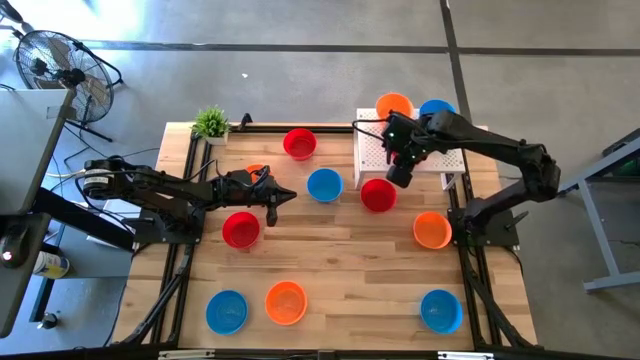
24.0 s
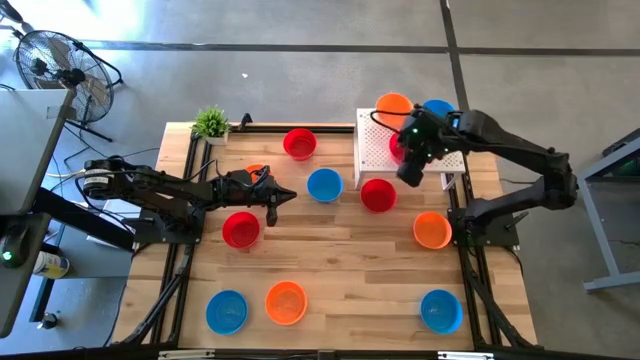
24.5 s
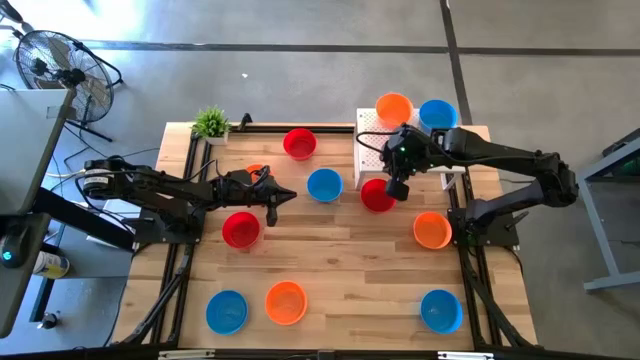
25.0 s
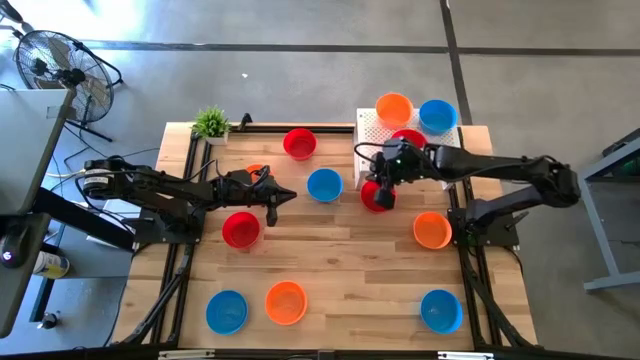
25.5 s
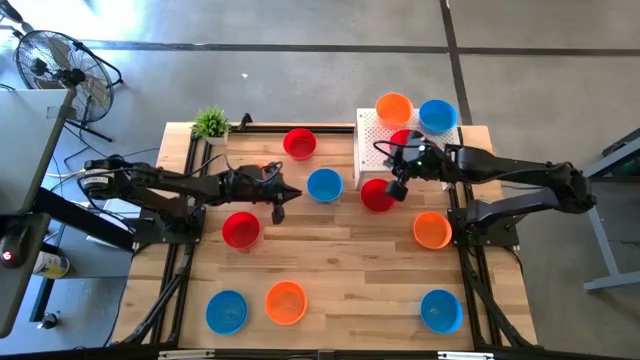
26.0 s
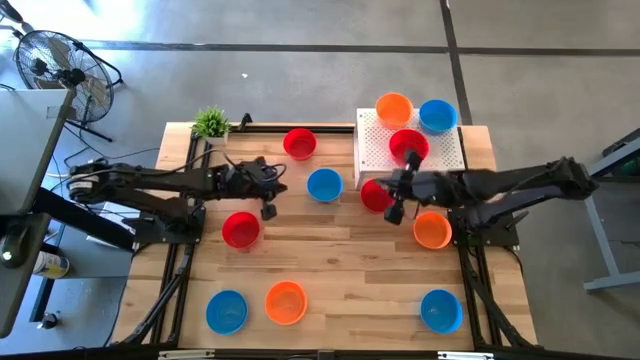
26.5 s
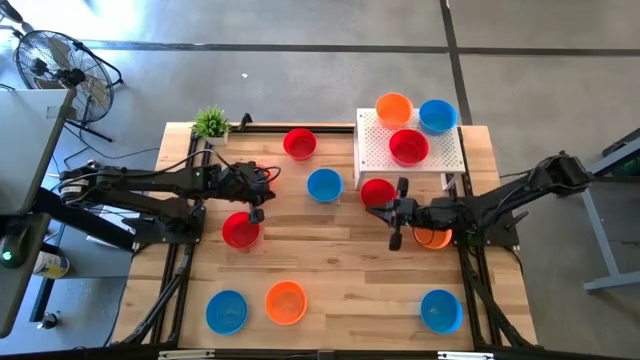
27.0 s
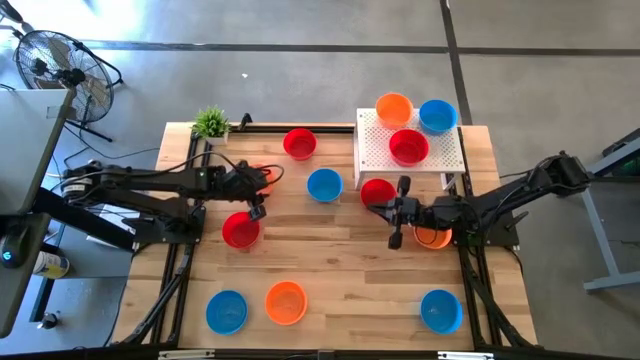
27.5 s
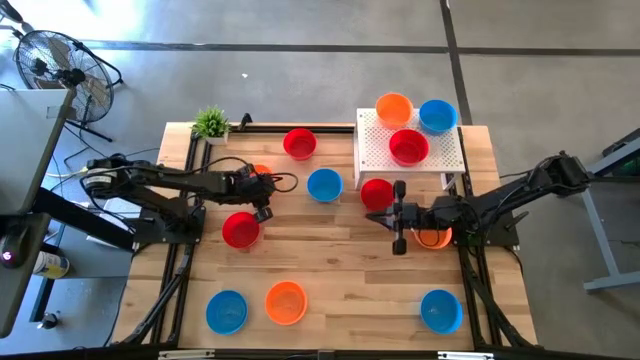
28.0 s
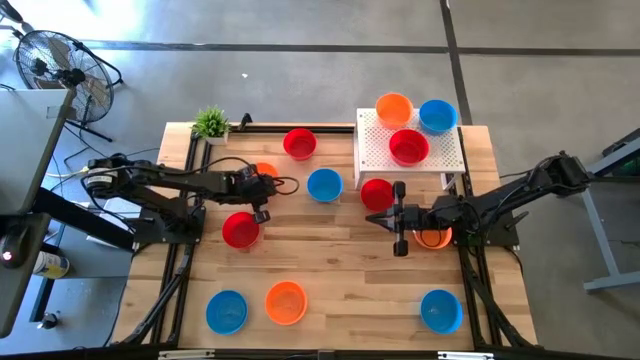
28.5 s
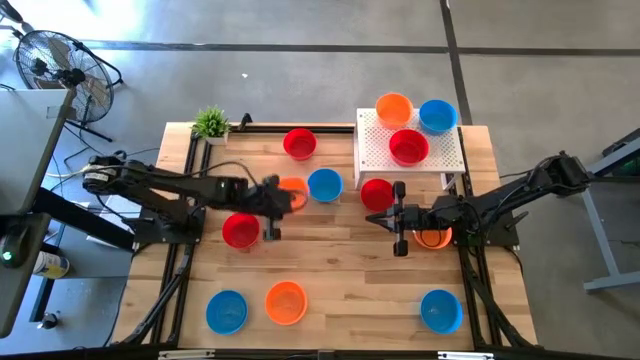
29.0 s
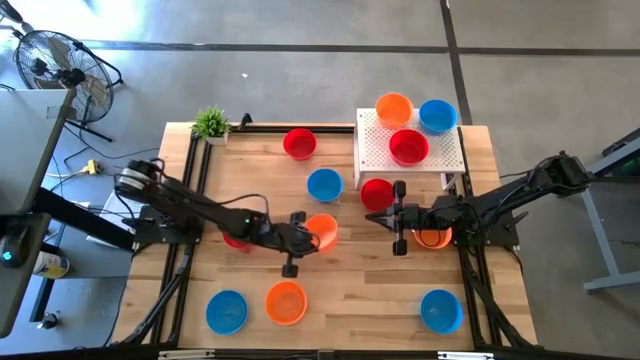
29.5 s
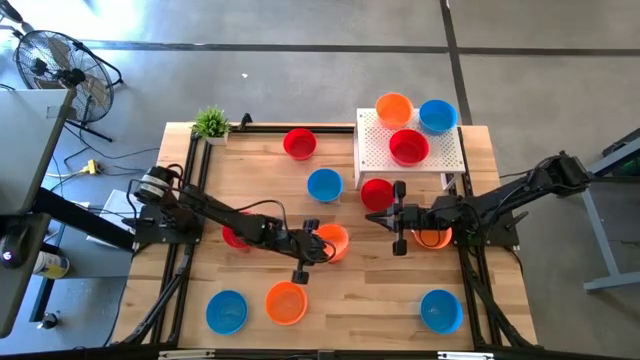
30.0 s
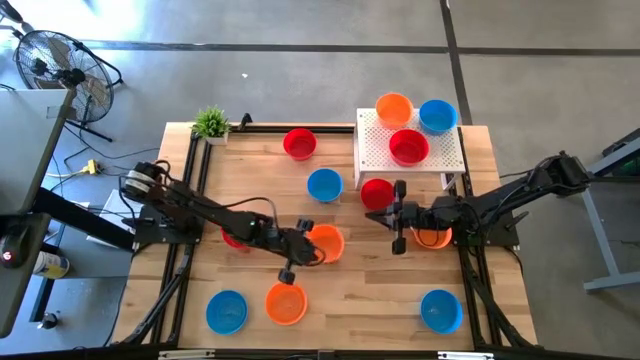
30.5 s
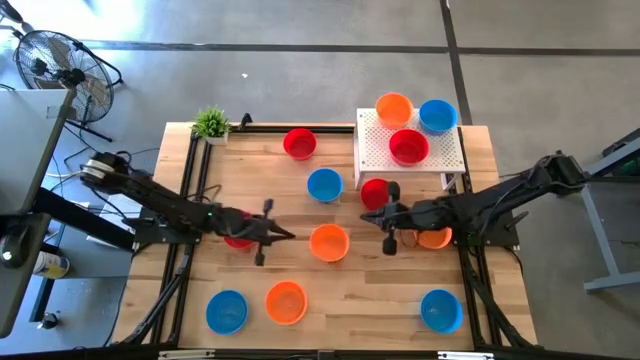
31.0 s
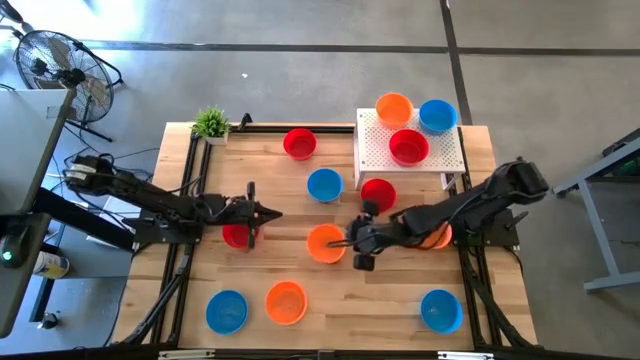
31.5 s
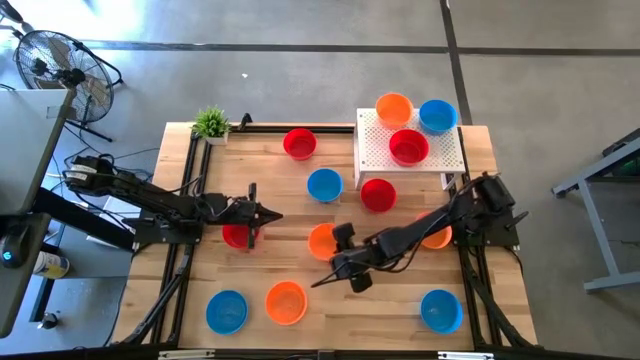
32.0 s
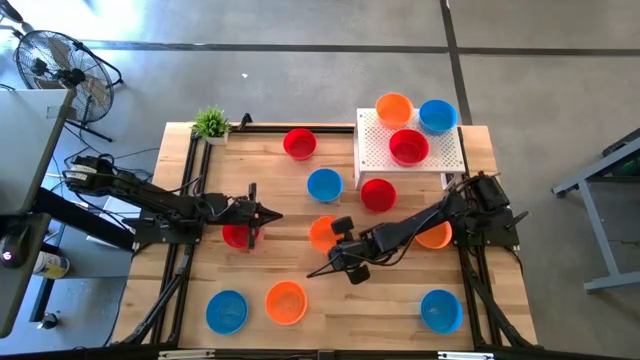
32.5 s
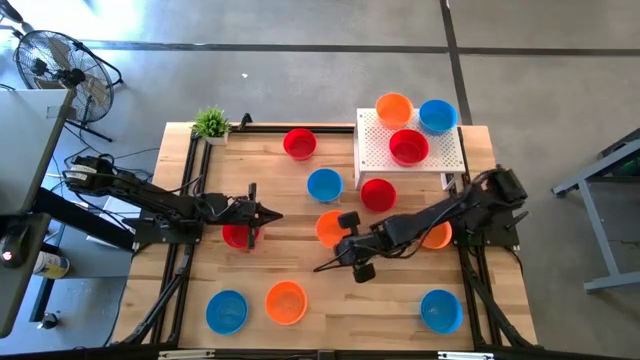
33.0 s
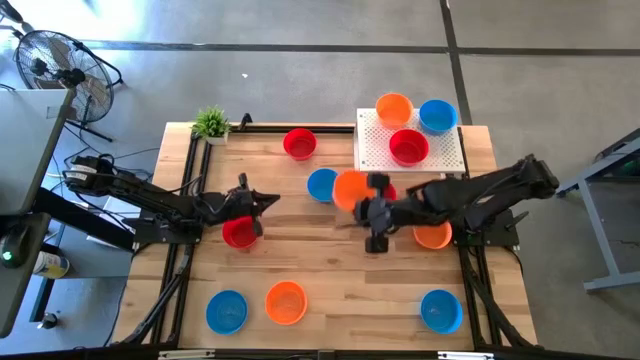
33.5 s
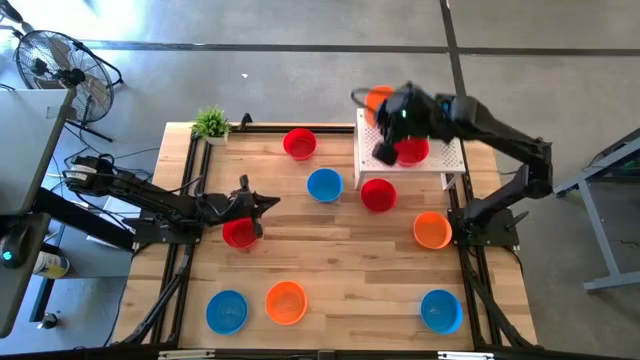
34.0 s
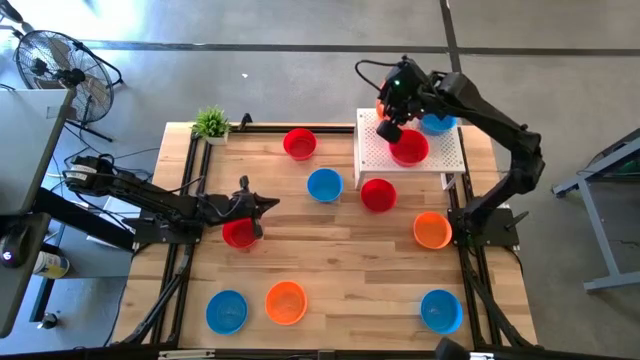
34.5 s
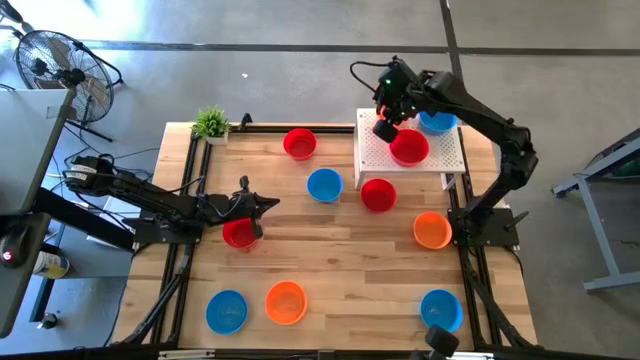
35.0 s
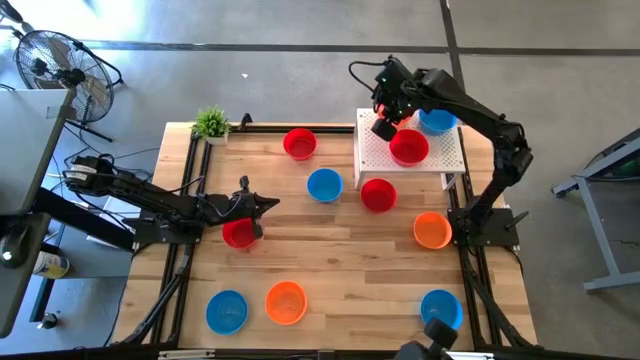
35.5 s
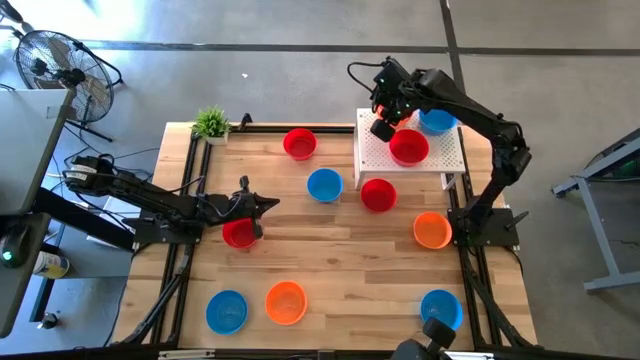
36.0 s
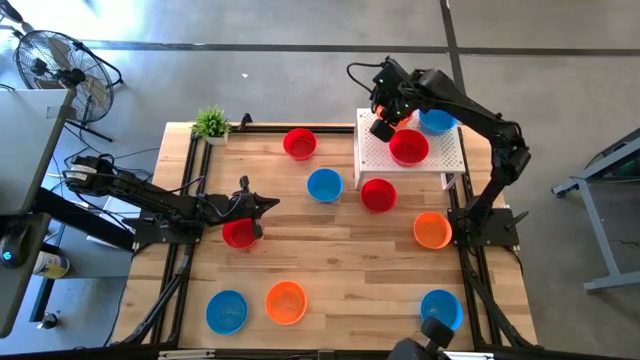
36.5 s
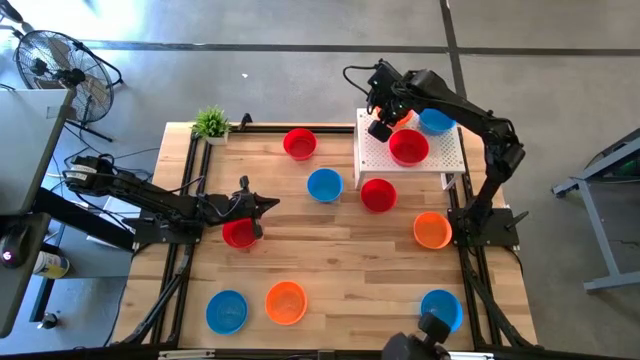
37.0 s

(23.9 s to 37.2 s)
Task: Pick & Place Mini bowls
Stack the orange bowl on top of the orange bowl on the shelf

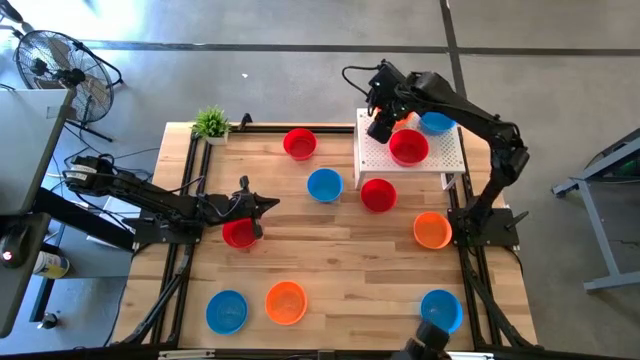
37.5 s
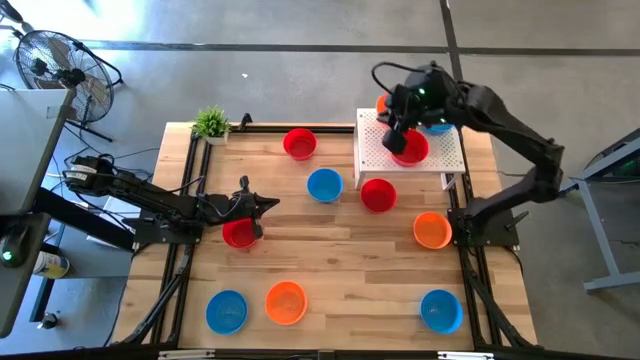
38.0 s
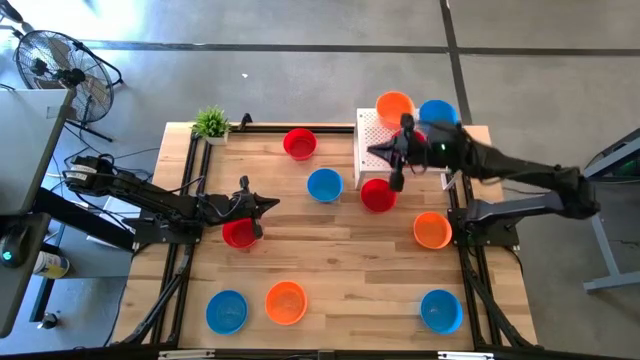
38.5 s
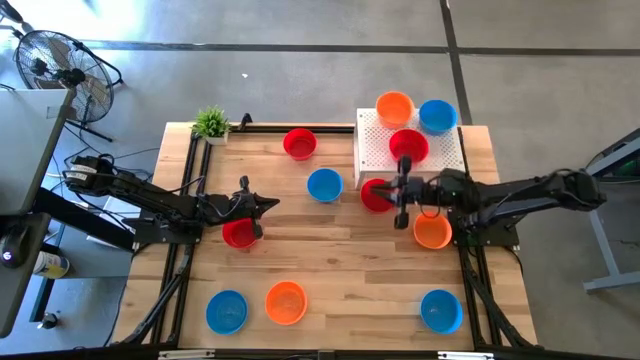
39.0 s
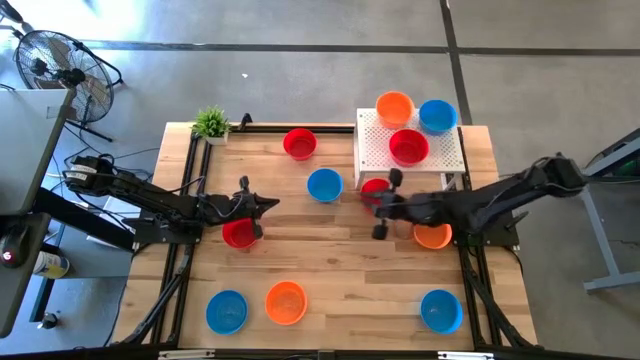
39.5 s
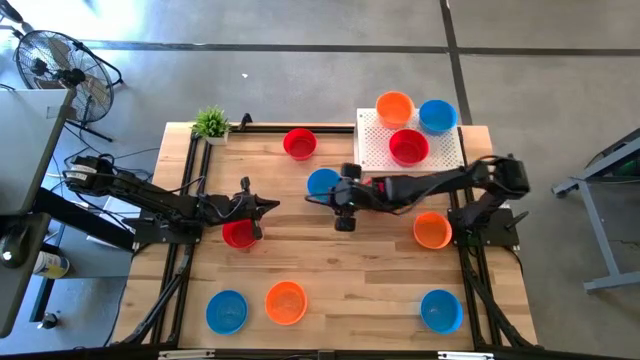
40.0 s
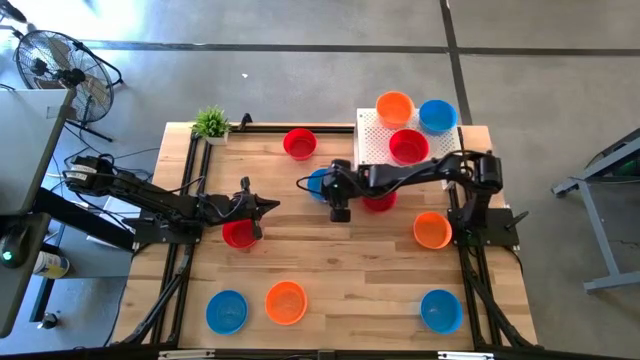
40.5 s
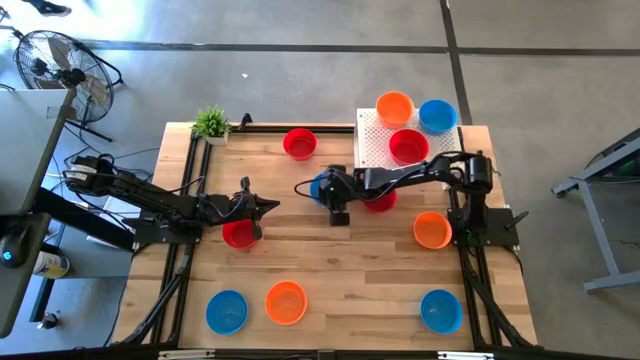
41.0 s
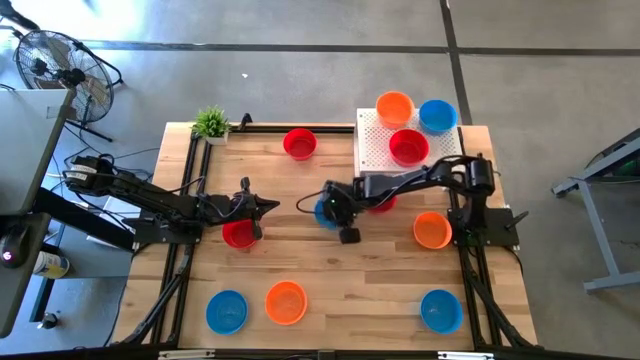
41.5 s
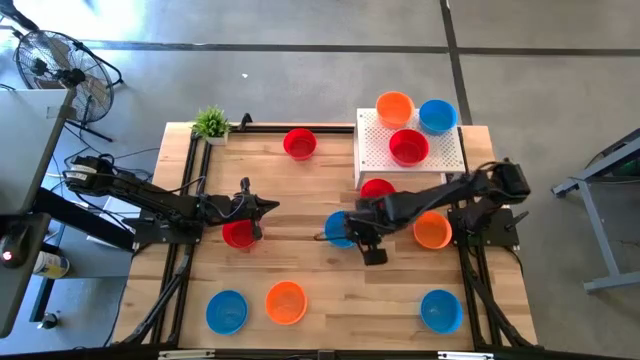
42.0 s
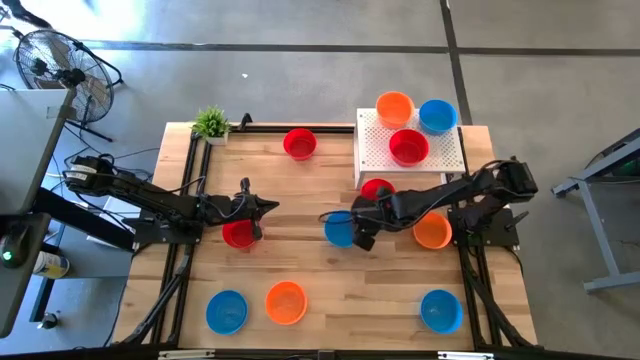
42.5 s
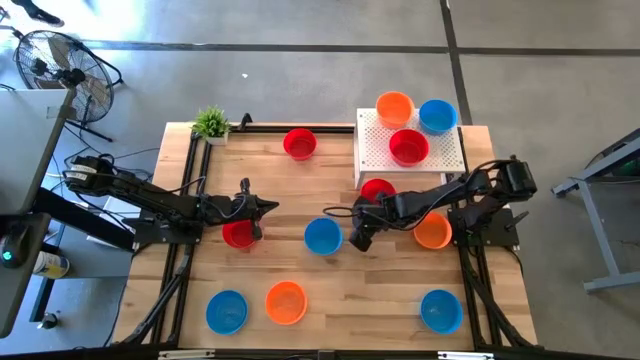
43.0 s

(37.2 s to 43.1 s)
Stack the blue bowl on top of the blue bowl on the shelf

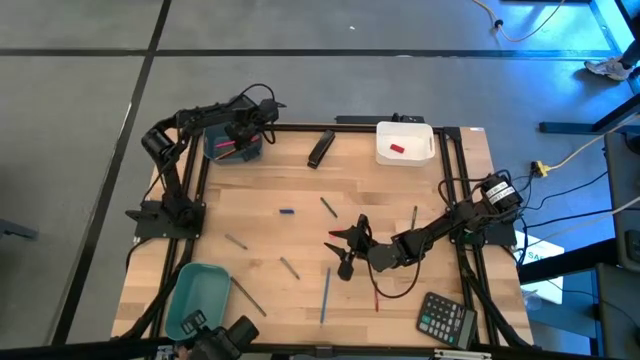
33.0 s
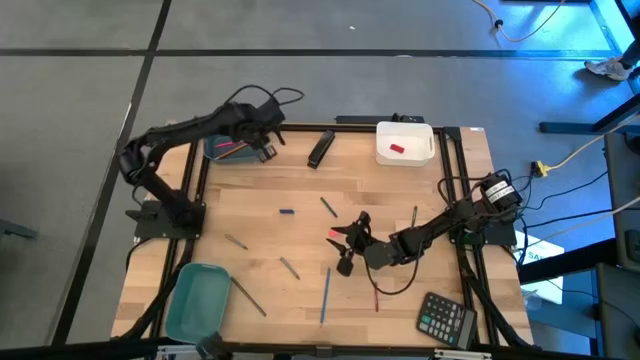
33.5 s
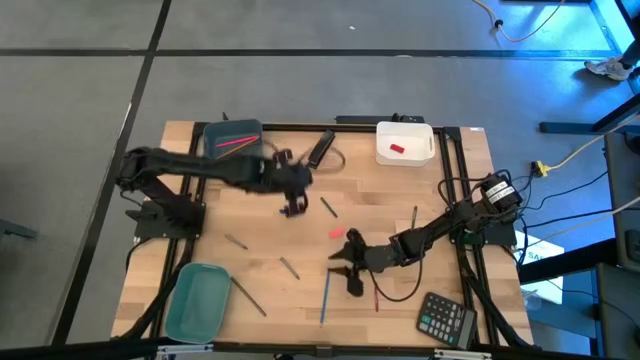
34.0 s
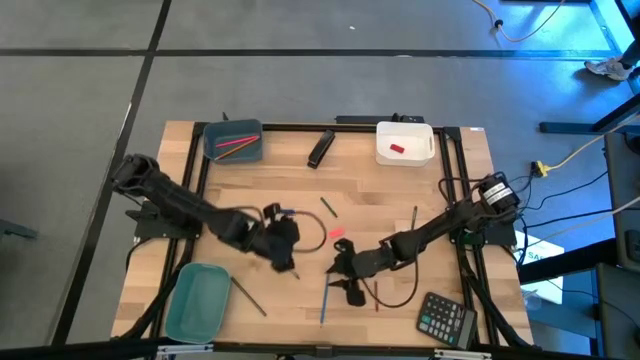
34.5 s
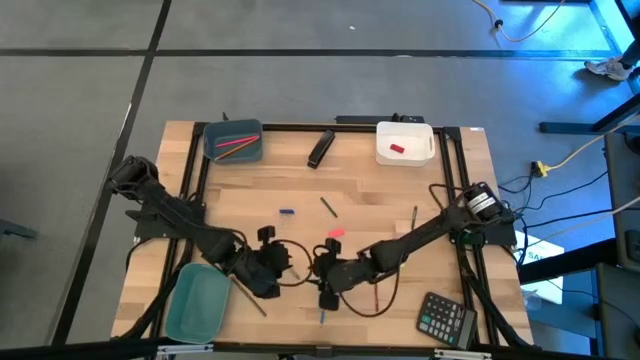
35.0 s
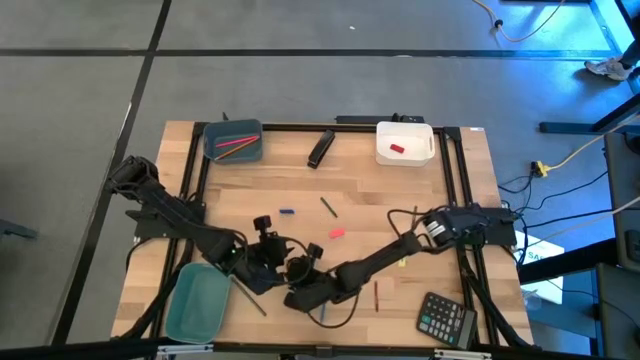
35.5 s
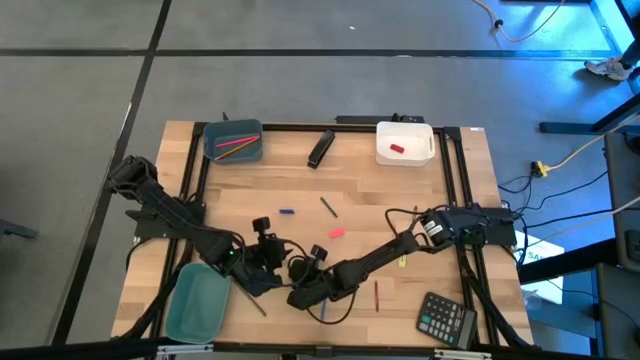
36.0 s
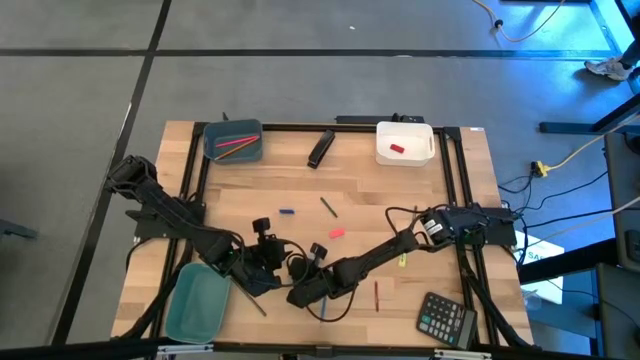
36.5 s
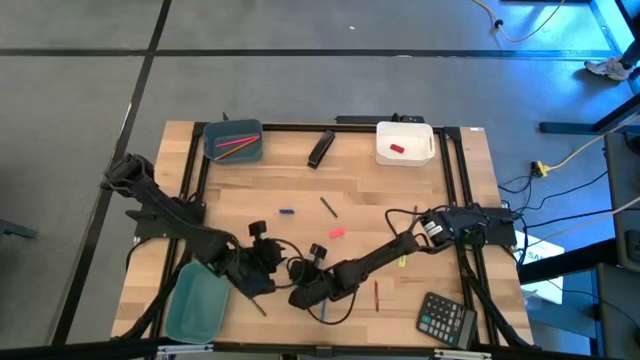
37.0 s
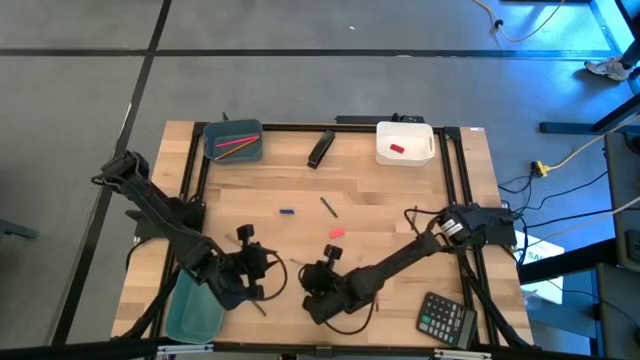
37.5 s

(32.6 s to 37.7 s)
Task: Sort crayons/erasers/pens/pencils in bins
Put the gray crayon into the green bin
